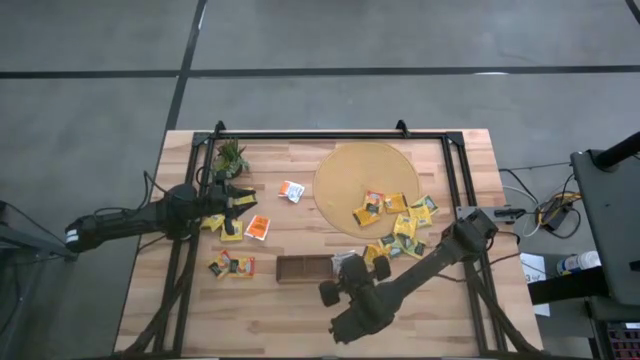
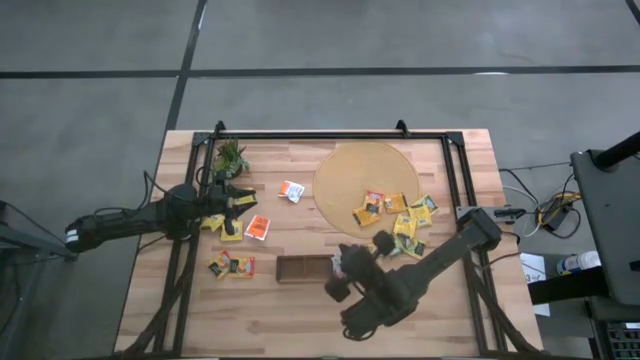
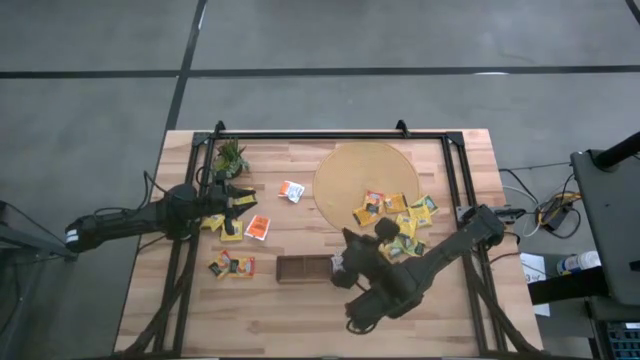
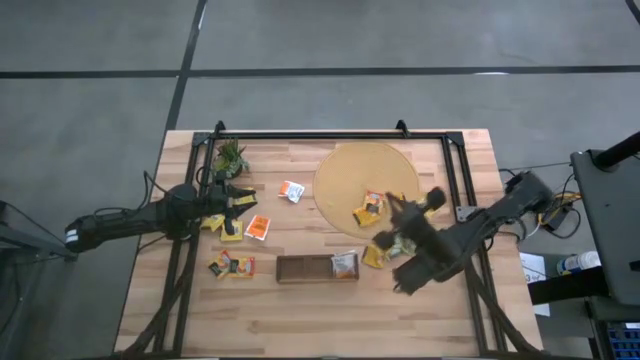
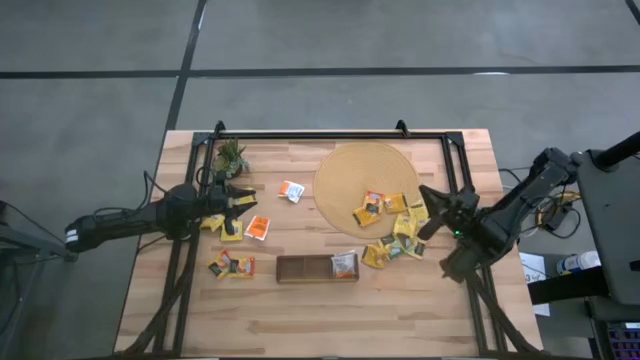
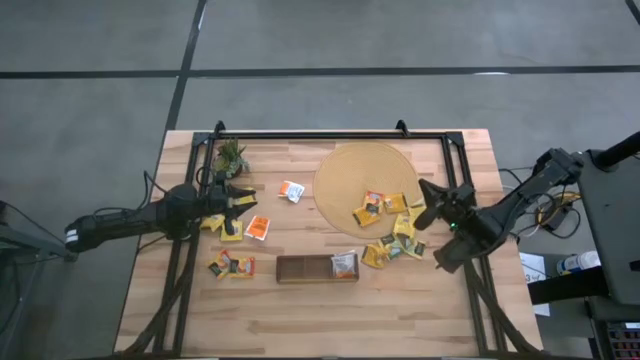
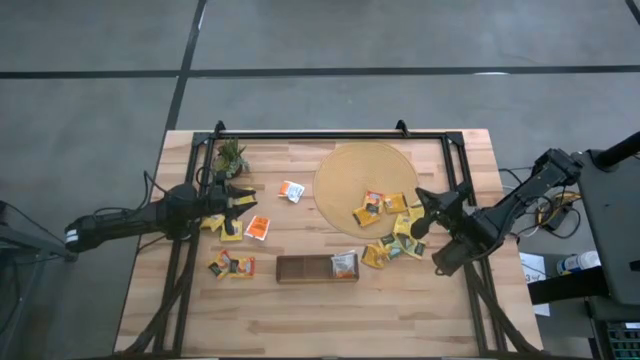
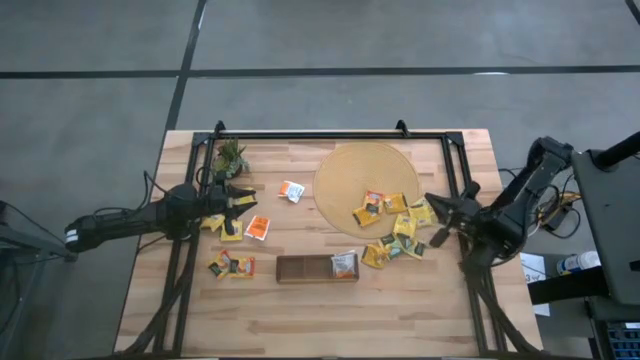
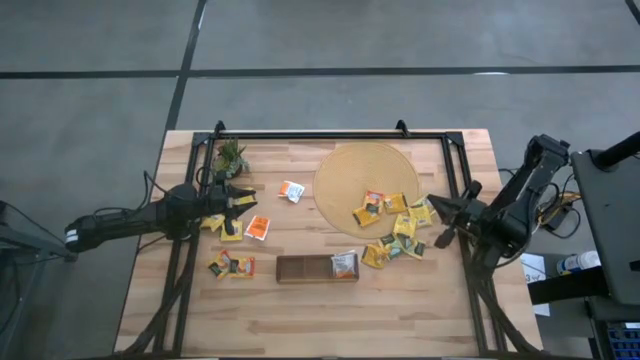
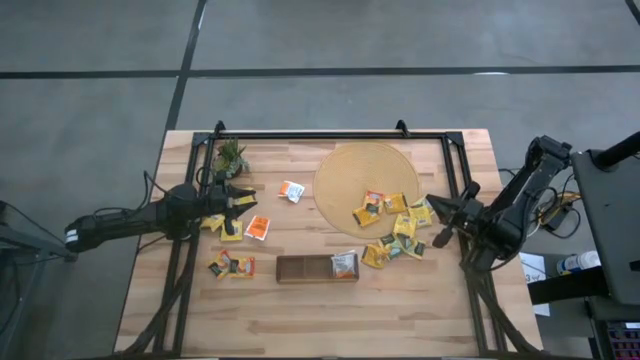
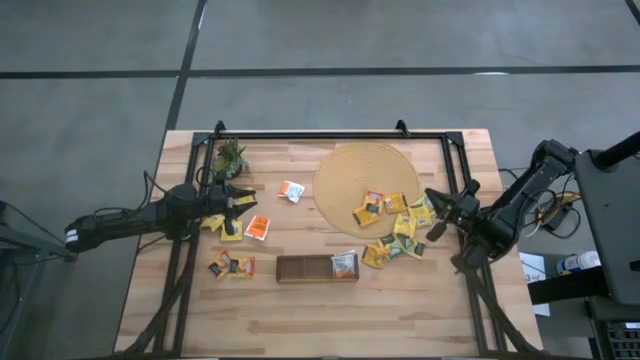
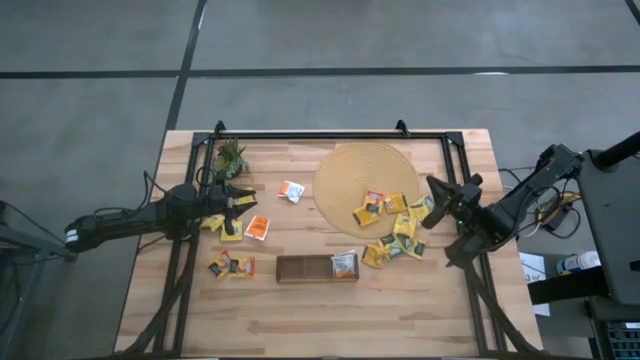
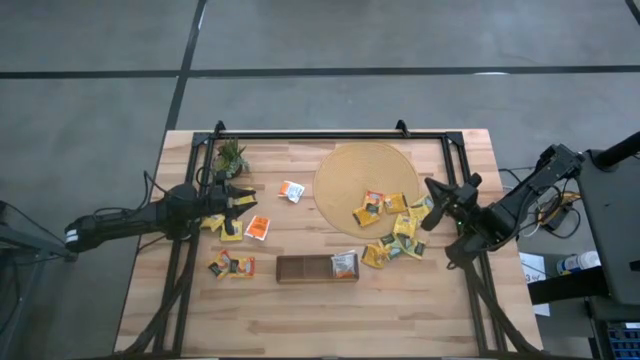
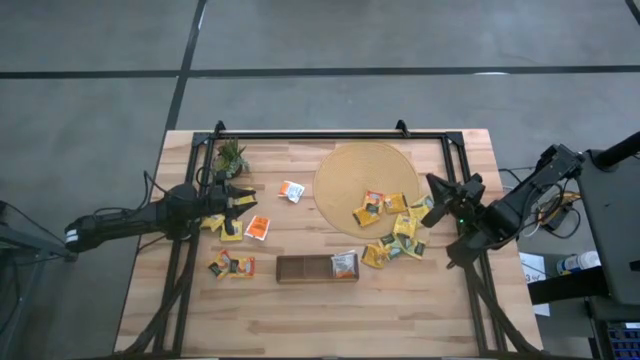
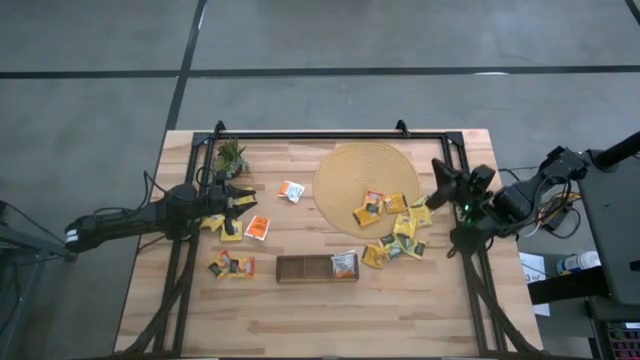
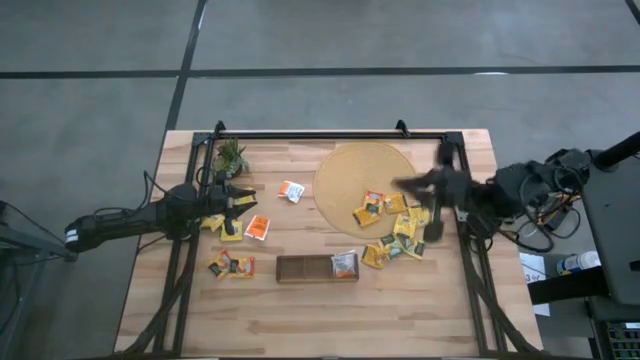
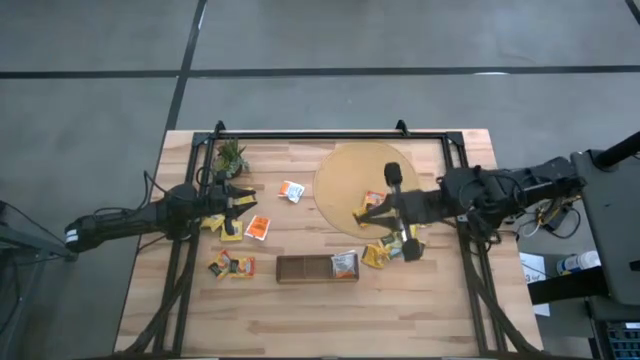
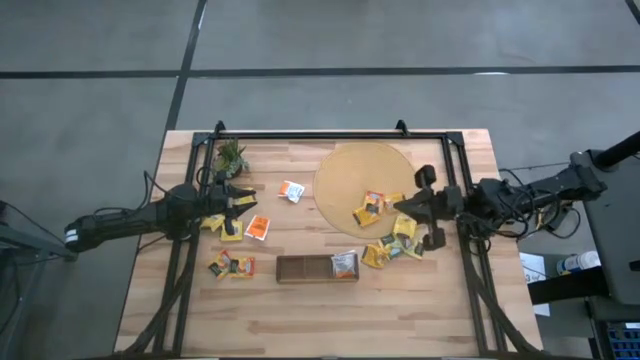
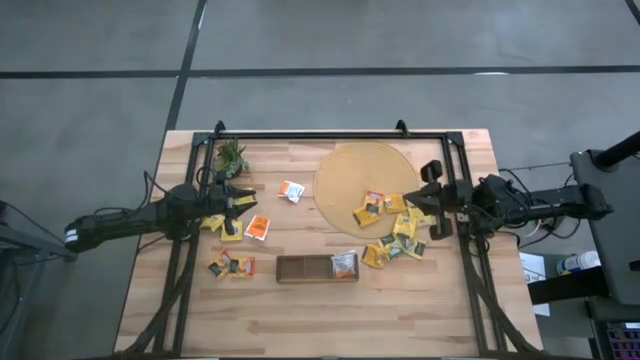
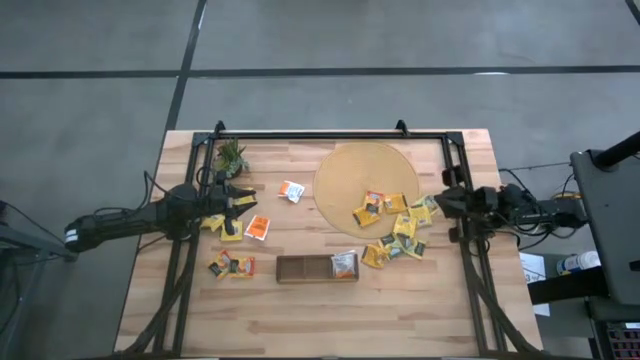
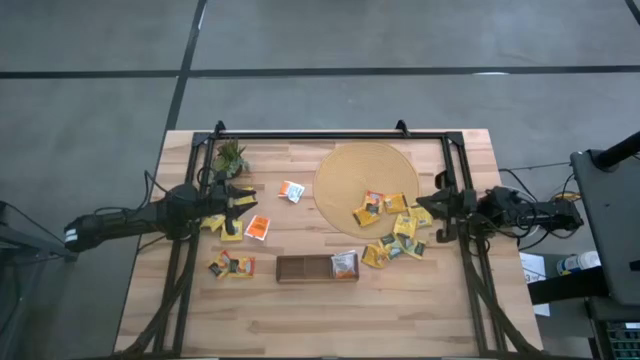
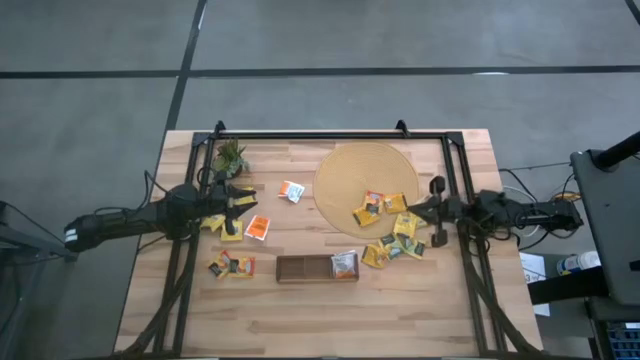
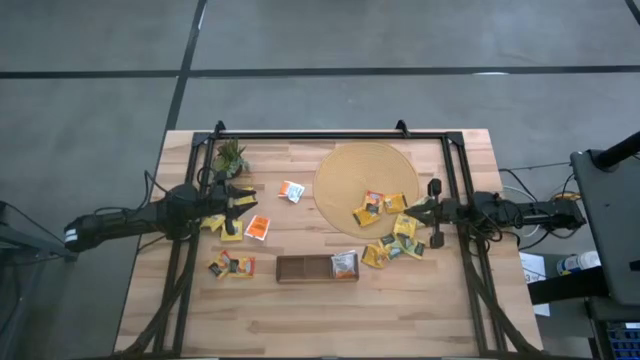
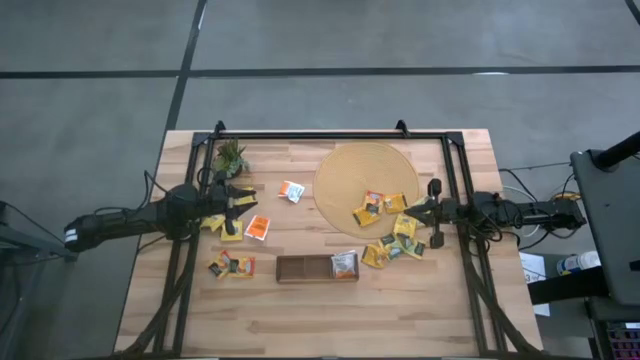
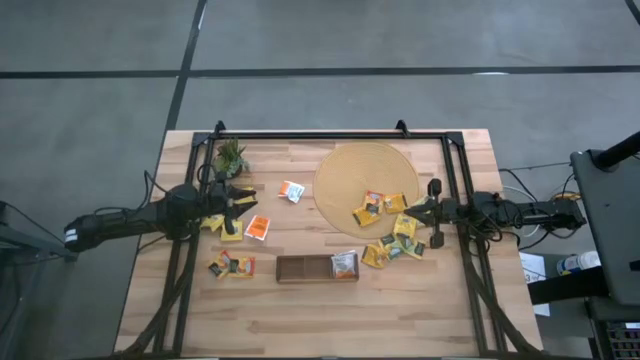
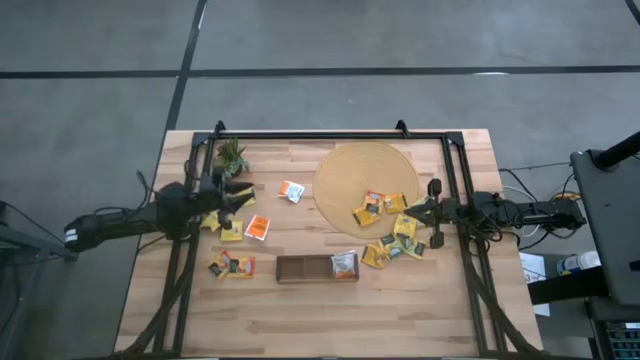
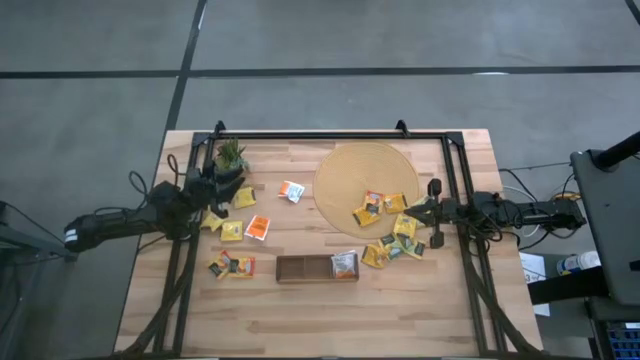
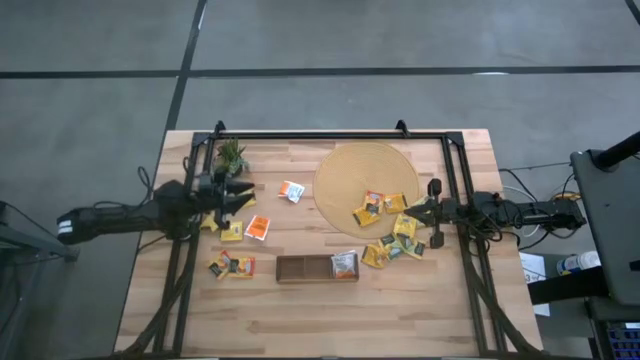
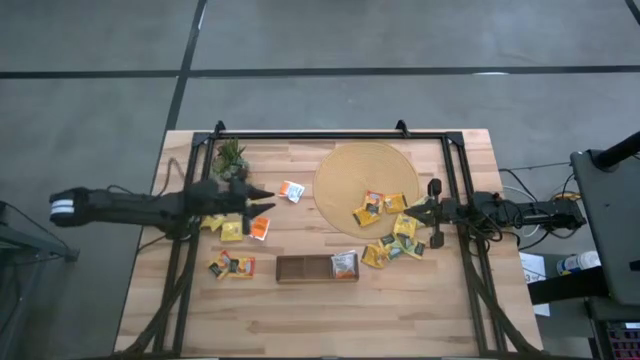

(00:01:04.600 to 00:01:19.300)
Task: Pick & Place Tea
Put the white tea bag into the right section of the wooden organizer
